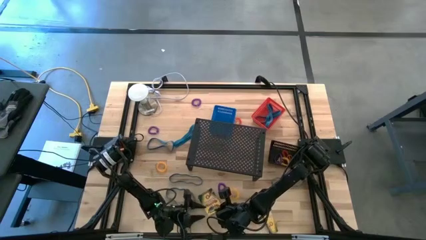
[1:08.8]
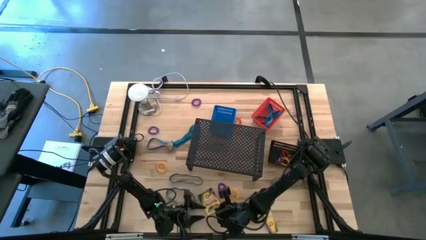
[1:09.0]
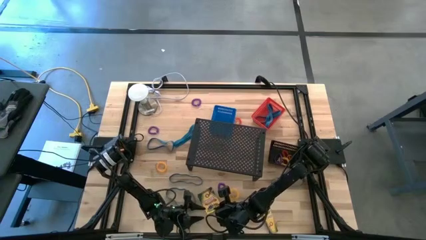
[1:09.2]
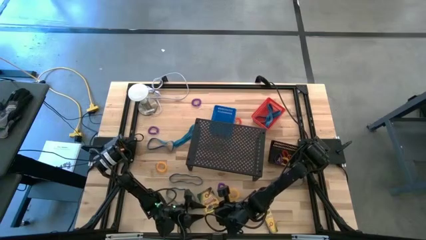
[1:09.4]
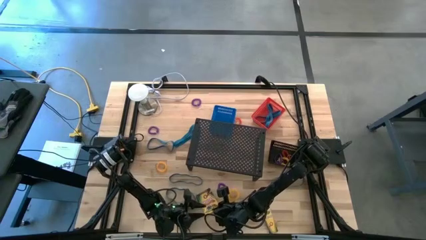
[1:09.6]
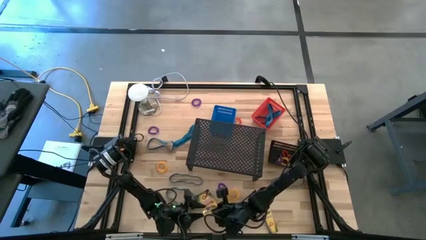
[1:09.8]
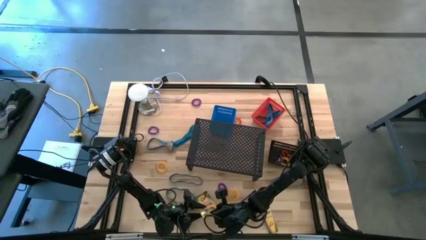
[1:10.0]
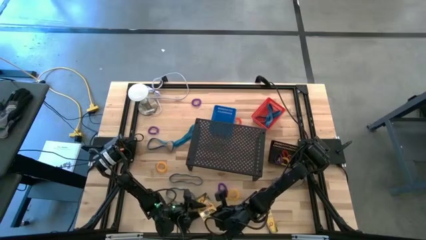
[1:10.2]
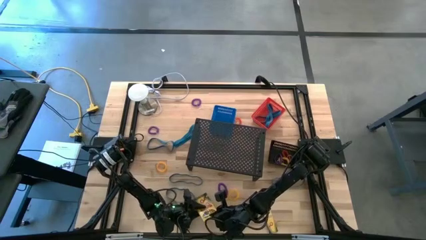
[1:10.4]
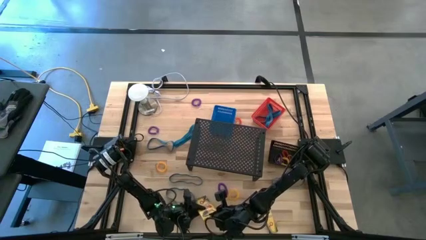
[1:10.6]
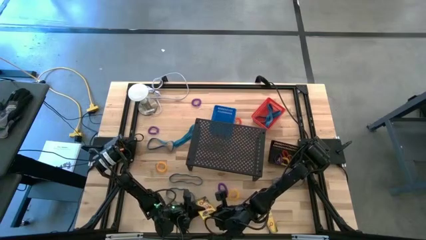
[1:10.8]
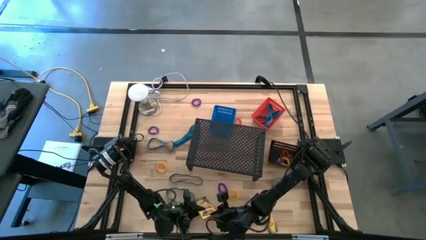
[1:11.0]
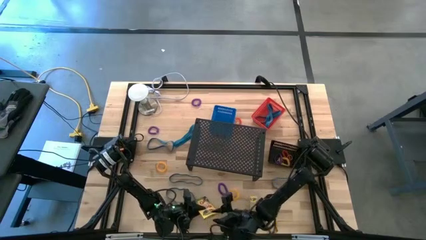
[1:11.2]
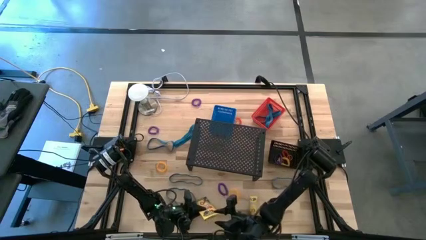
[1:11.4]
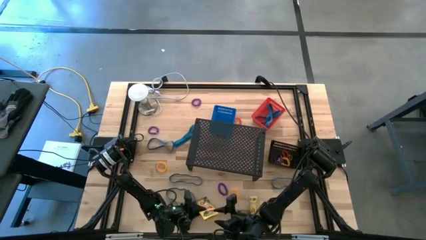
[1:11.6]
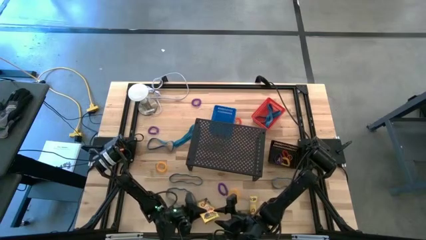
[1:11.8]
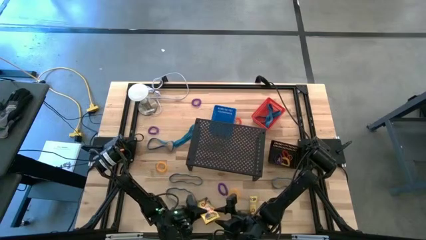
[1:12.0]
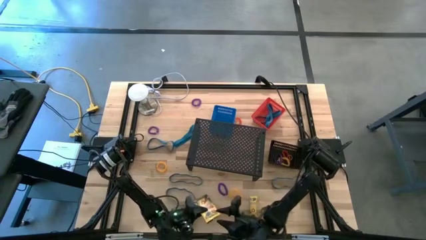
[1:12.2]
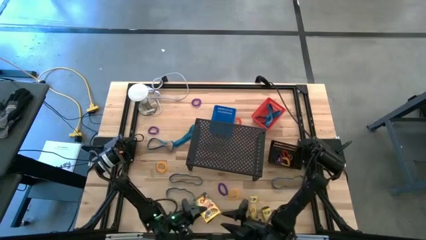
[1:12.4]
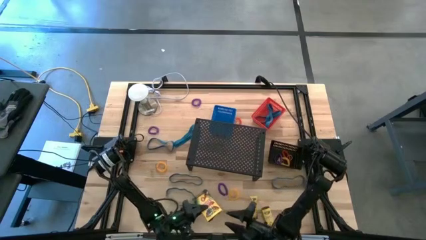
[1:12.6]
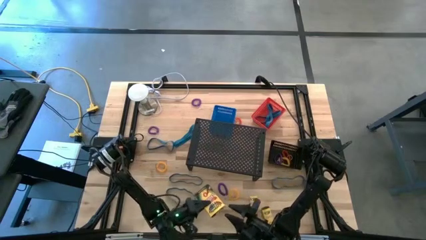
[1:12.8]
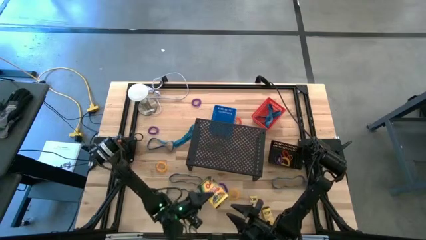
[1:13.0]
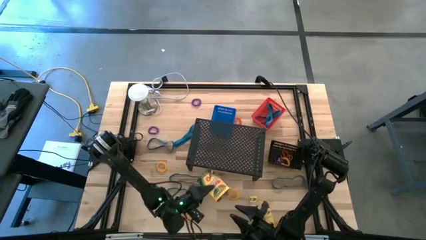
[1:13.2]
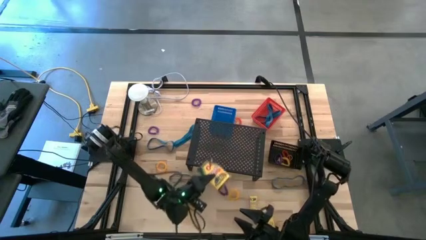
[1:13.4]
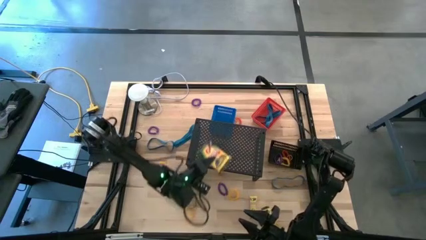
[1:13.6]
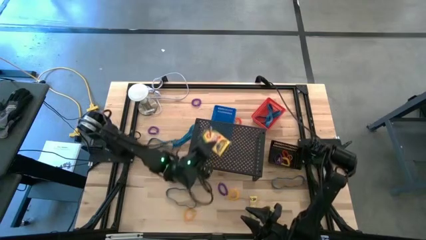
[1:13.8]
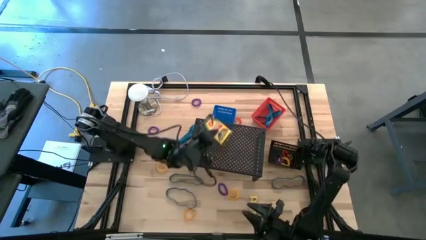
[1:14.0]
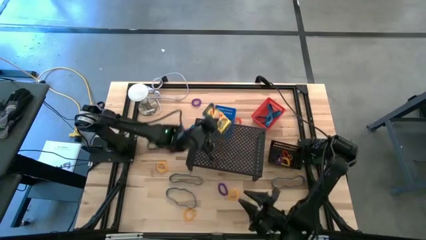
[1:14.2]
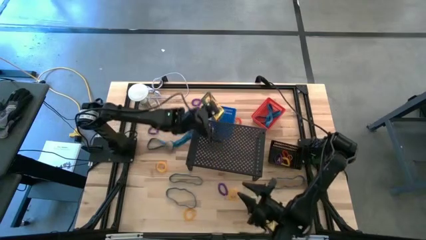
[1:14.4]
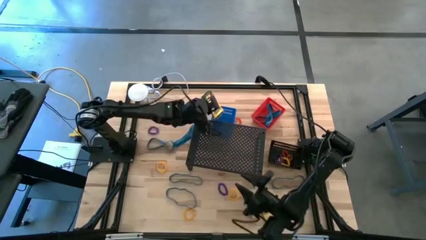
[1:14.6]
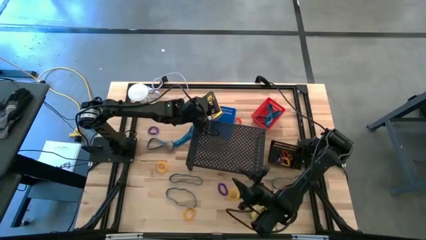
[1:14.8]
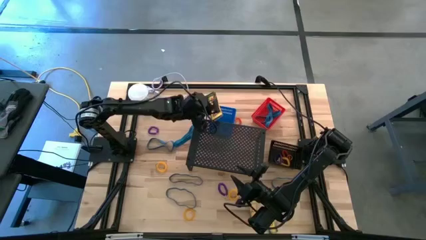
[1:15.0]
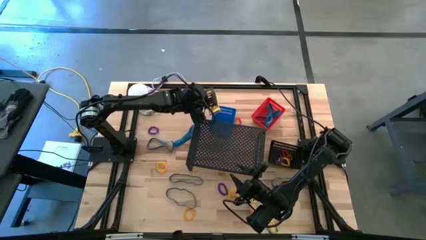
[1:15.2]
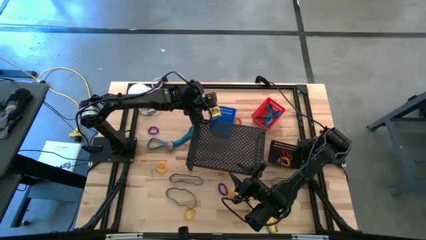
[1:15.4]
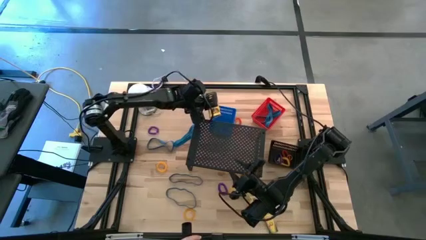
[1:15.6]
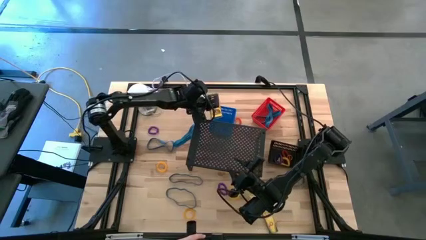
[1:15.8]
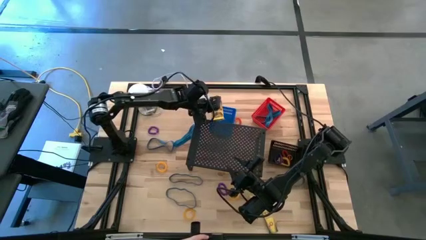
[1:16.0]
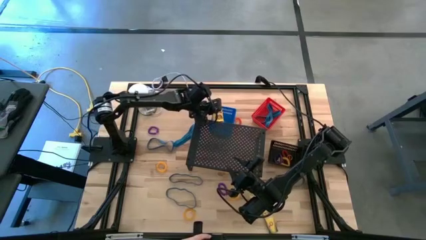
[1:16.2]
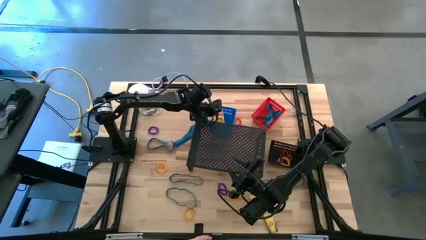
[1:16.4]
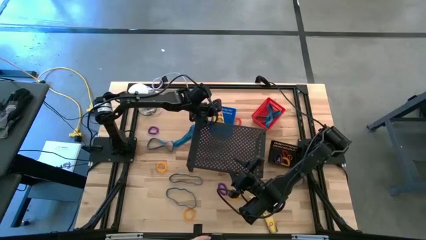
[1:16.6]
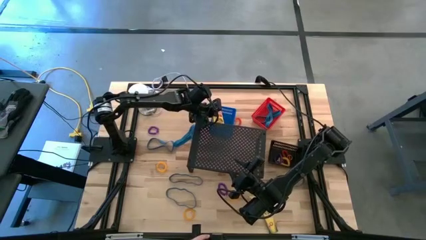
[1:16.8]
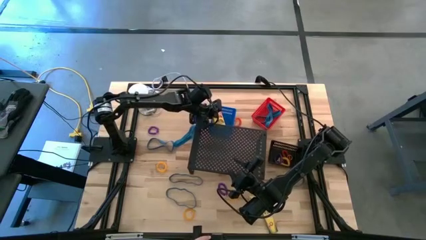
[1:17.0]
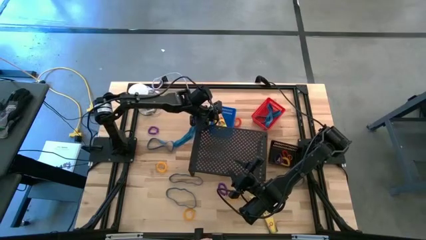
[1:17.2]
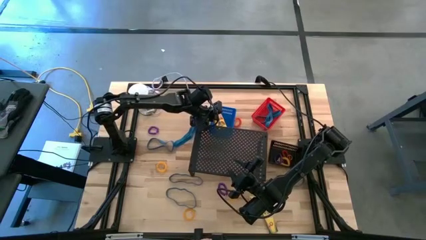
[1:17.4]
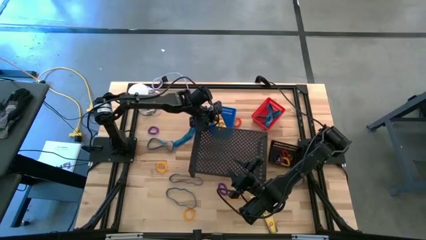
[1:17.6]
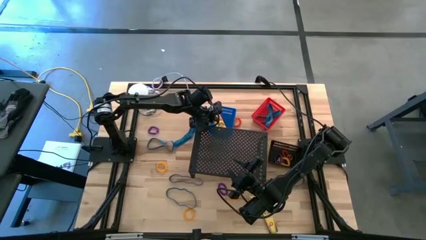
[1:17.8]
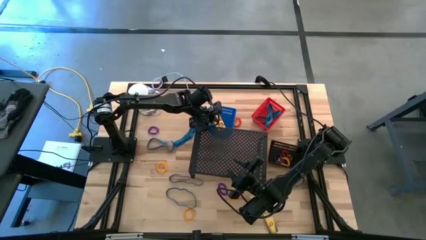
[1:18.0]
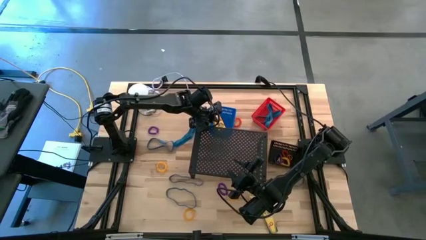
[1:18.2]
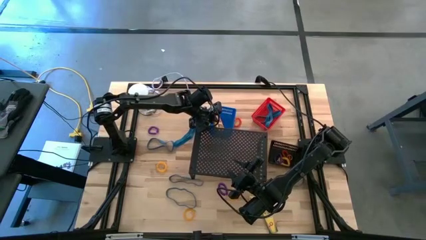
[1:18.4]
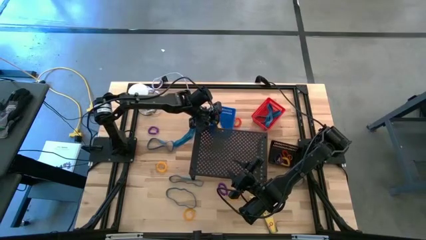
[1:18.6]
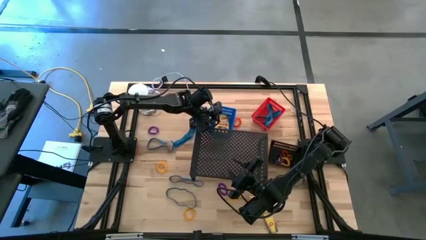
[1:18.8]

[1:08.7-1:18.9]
Task: Pick & Place Office Desk Supplies
Put the yellow crayon box into the blue bin

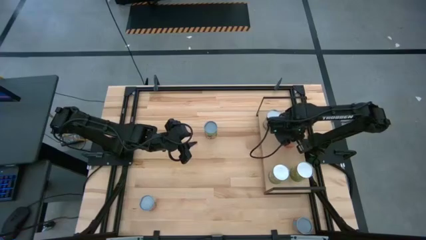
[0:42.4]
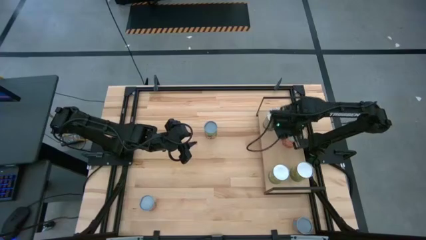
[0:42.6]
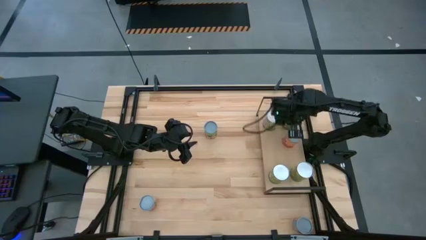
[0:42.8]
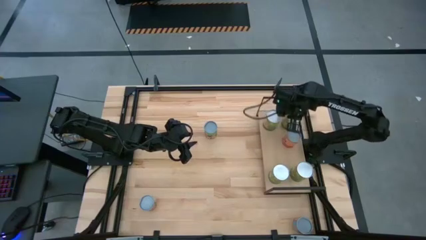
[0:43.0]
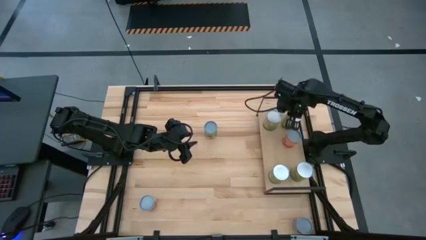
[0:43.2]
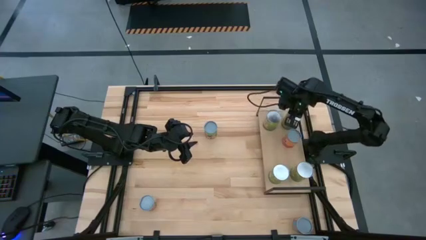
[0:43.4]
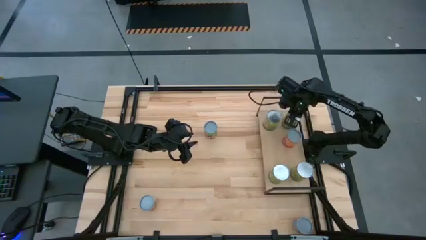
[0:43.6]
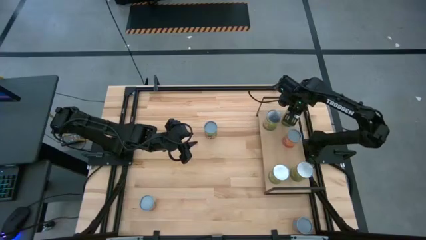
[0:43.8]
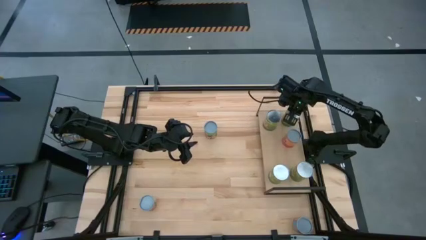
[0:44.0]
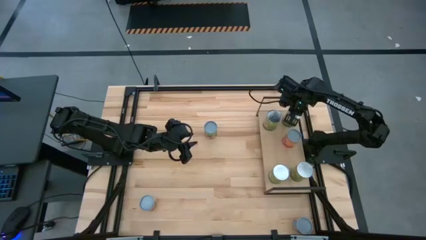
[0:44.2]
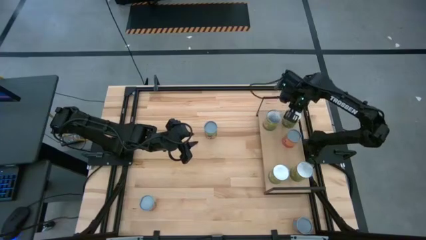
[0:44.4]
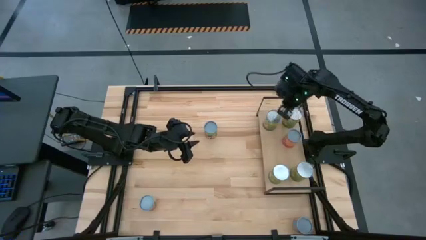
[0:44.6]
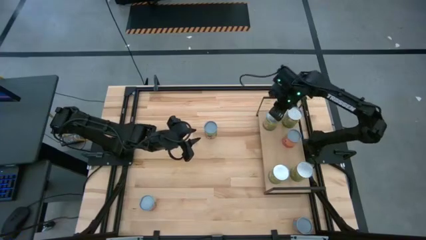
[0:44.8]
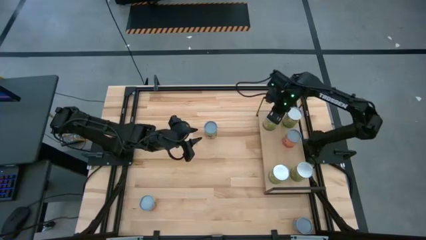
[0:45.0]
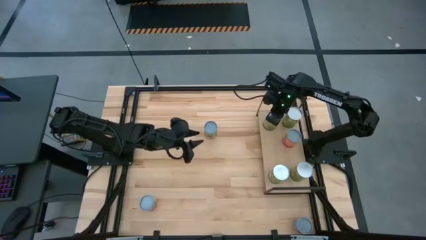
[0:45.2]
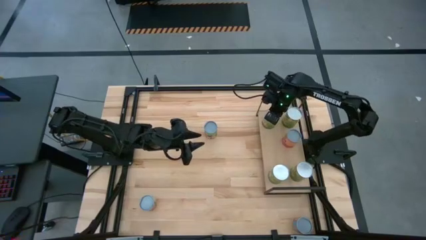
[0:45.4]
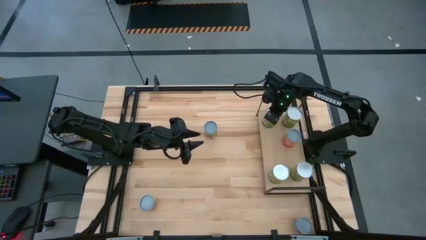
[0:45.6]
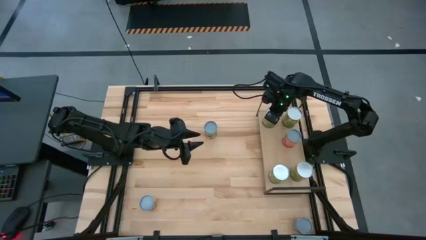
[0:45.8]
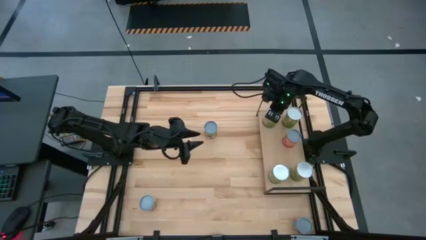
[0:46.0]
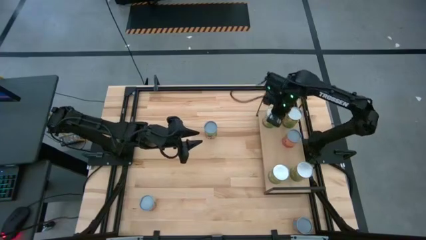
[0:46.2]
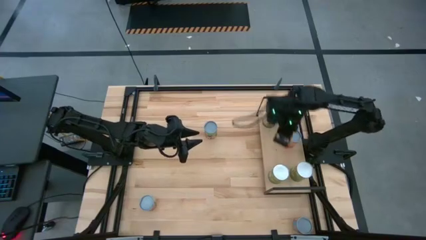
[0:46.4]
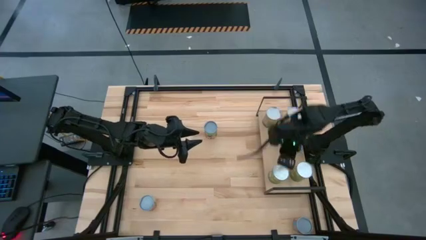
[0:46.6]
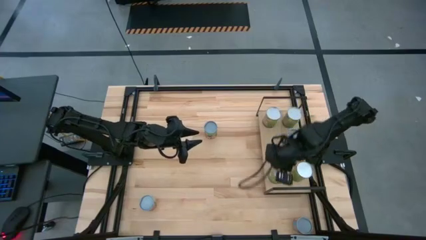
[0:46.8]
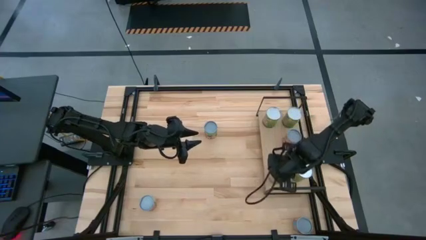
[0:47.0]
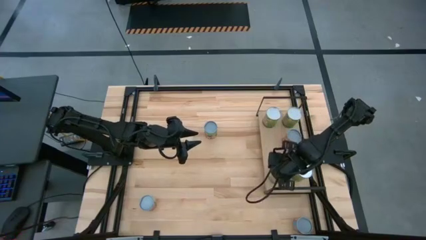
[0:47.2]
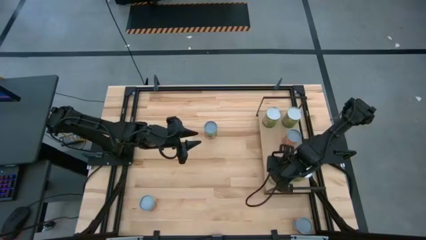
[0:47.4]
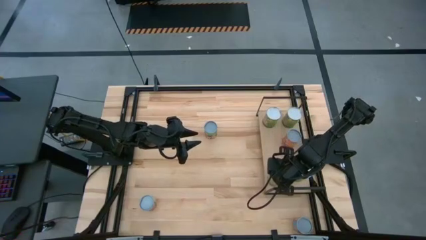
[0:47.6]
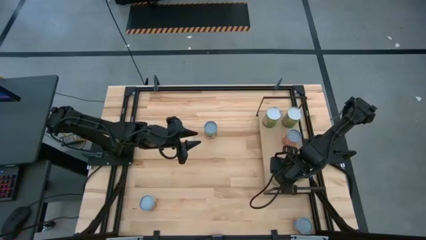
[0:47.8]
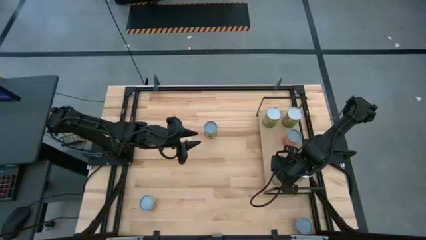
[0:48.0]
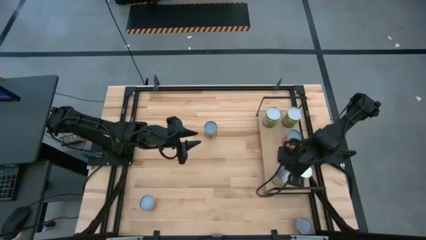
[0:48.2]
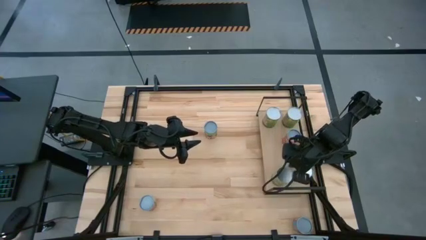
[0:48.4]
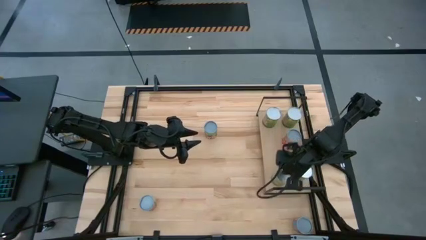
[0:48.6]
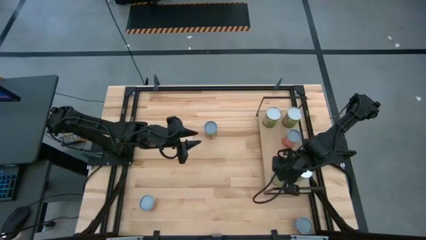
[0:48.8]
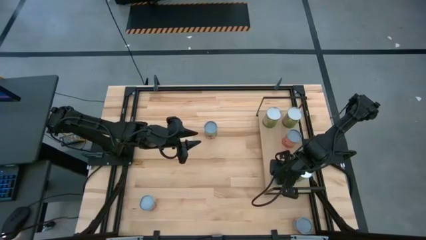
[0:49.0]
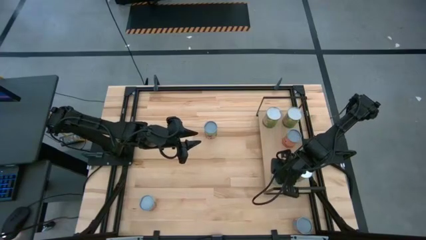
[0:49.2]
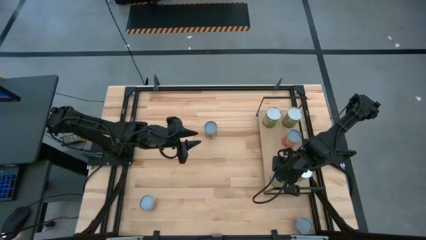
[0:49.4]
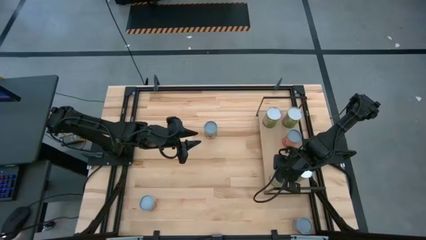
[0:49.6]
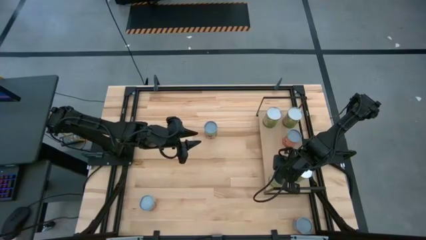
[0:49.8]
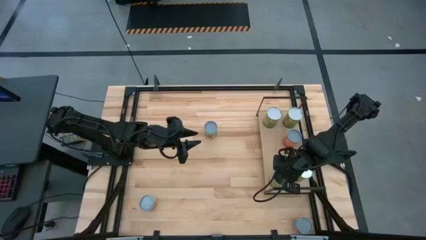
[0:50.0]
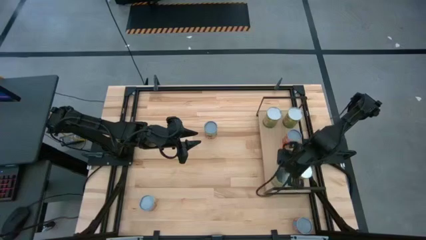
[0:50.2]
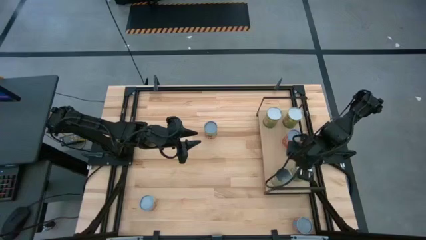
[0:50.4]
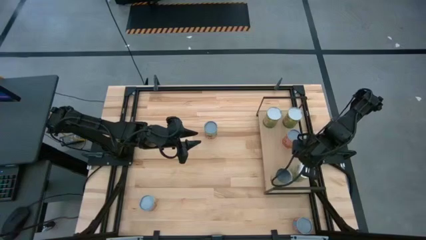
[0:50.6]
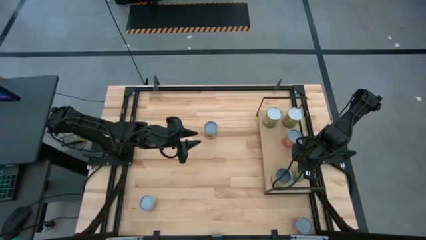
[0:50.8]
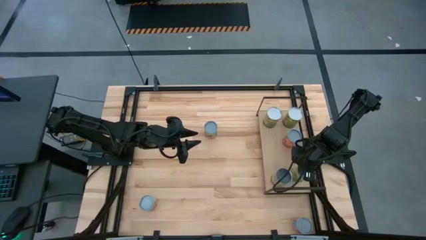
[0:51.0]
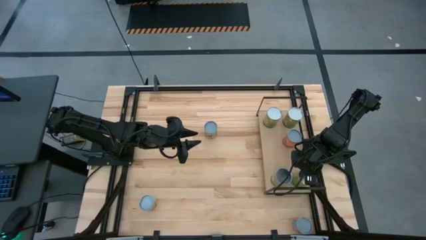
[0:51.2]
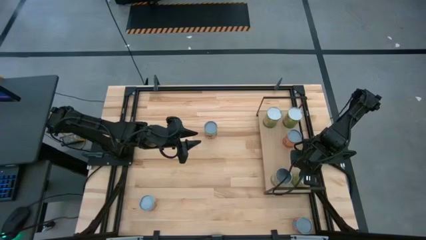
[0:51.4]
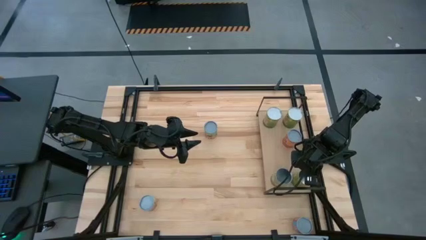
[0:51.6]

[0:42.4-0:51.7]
Task: Pick and place cans onto a shelf
Adjust the cans on the shelf
